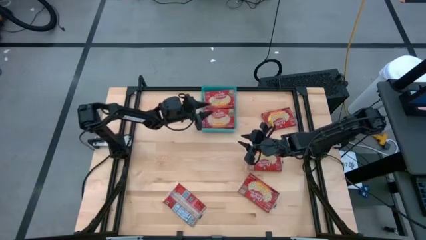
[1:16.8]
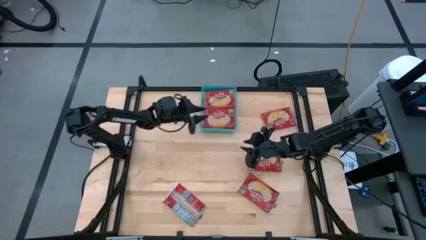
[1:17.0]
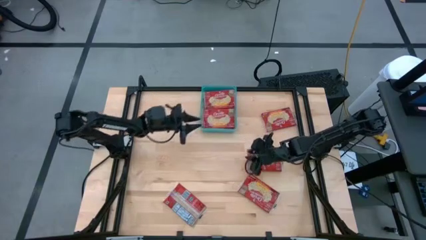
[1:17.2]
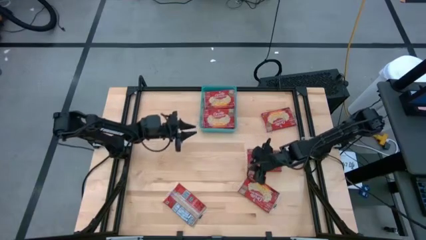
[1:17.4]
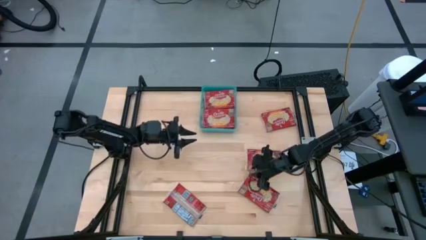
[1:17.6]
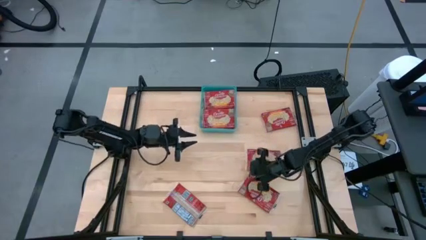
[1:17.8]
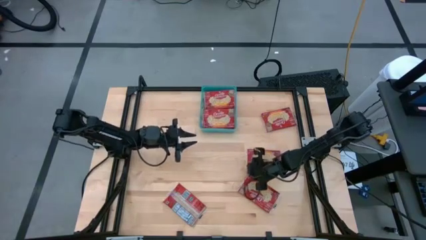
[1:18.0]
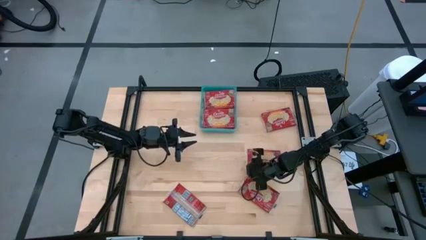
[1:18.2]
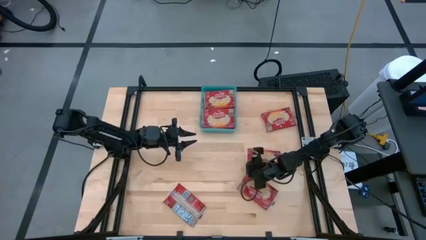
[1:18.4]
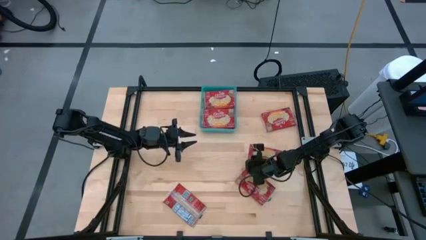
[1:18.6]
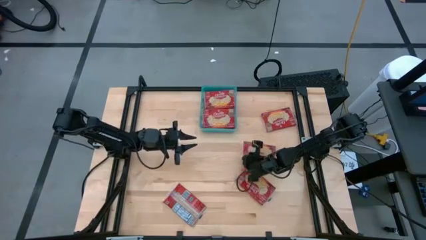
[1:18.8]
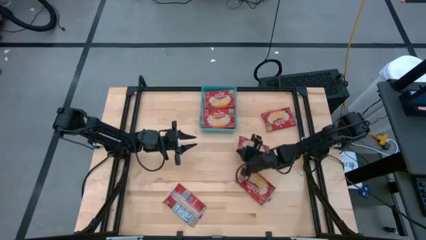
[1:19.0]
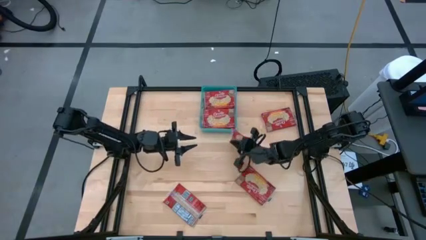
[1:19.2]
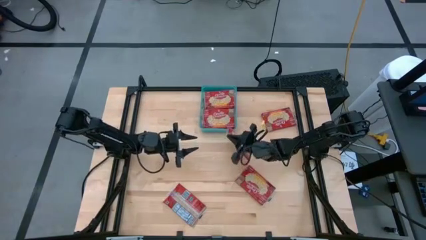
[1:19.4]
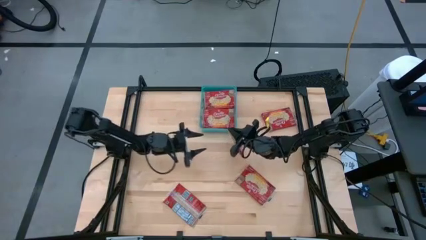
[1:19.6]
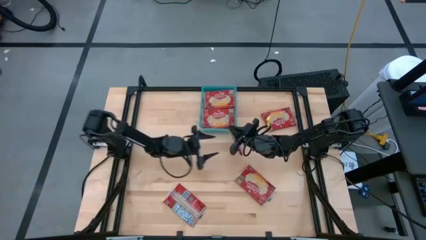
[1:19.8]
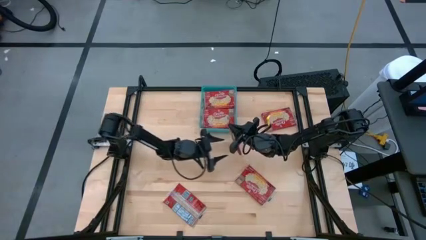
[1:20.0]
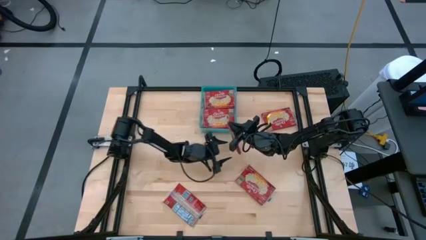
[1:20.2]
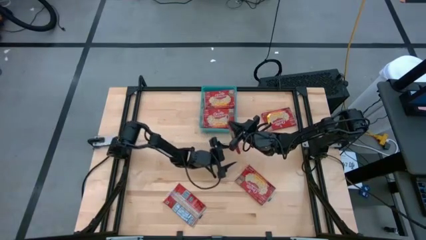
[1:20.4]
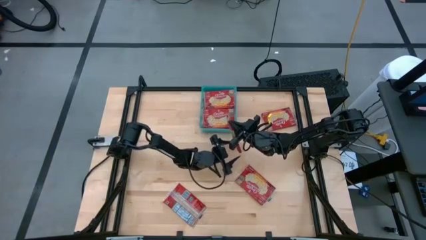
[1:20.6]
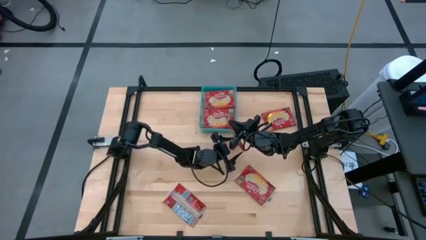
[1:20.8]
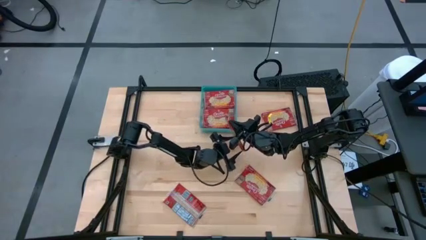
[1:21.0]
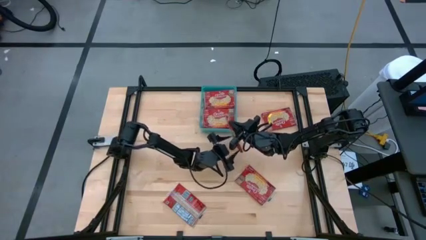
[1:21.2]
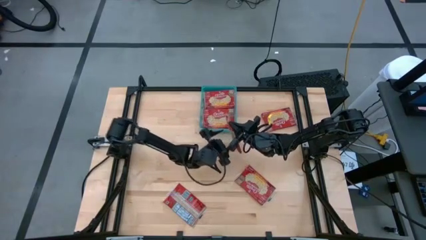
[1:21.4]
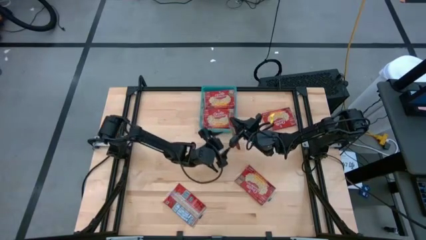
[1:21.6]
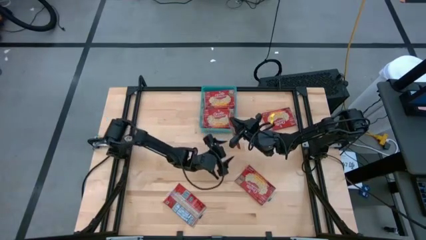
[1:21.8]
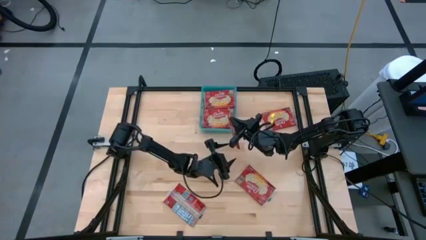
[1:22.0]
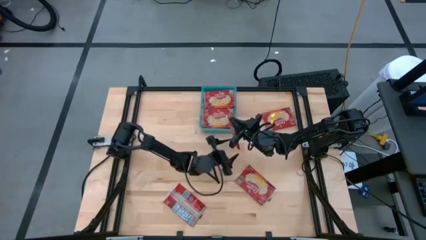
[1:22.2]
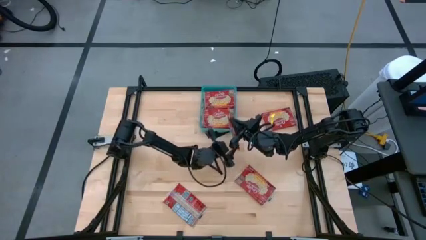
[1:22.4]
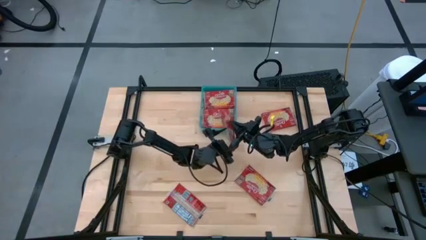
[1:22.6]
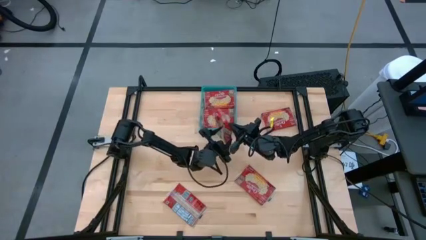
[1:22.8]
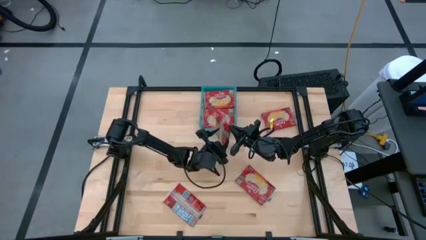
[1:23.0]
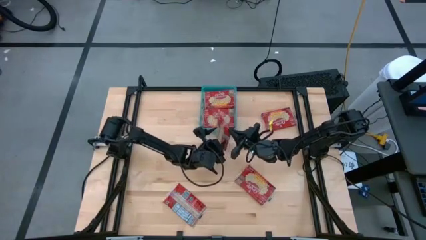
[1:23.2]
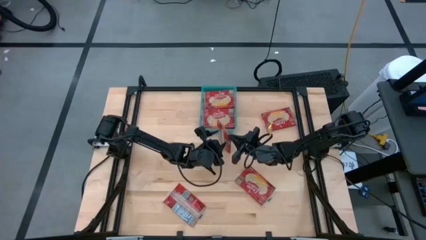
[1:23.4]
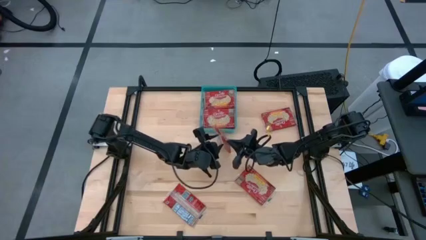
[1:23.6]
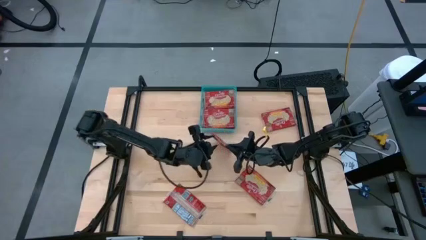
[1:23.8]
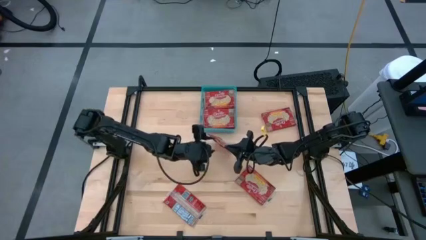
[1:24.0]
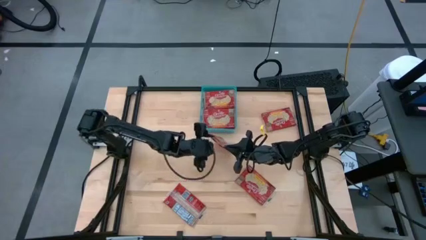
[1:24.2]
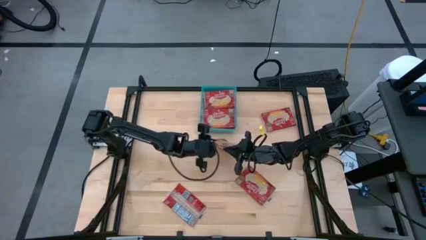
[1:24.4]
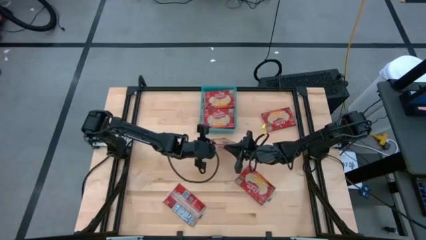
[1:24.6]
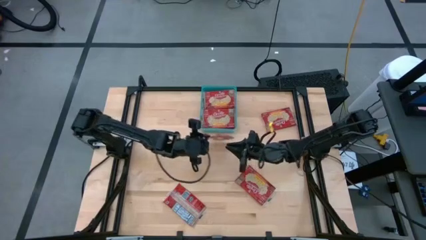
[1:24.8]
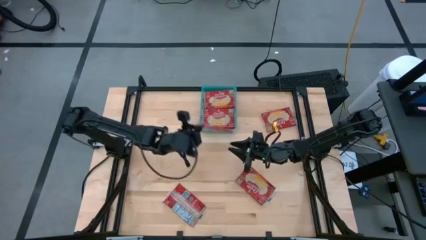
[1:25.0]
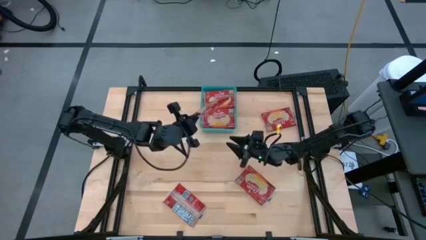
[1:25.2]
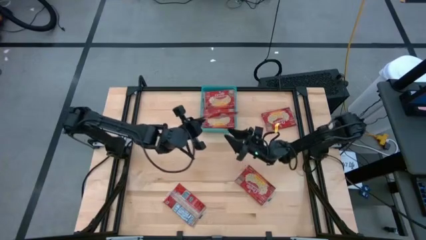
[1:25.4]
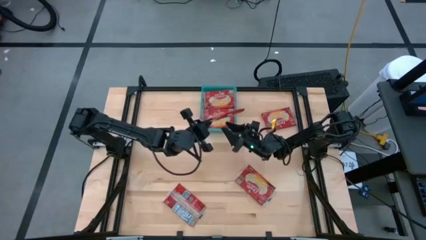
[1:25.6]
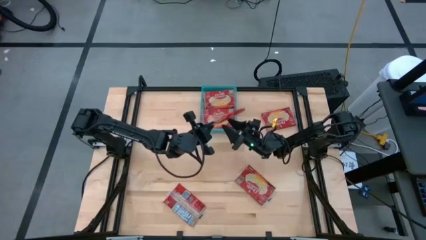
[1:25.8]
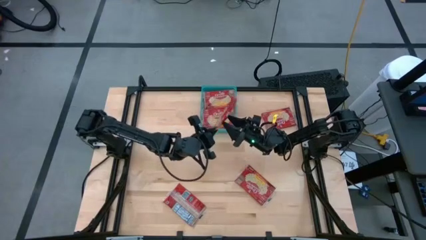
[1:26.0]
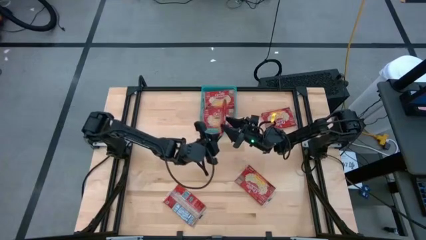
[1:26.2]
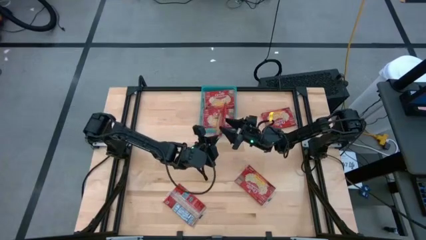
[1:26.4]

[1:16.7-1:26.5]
Task: Sort popcorn bags into baskets
Put the red popcorn bag into the blue bin

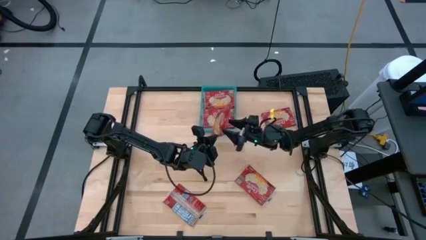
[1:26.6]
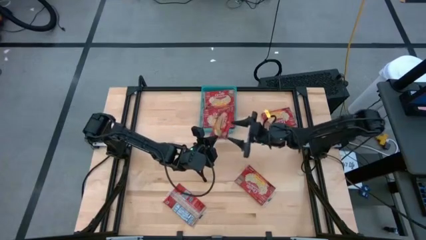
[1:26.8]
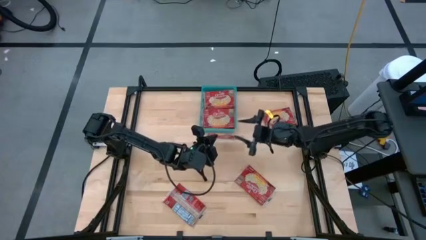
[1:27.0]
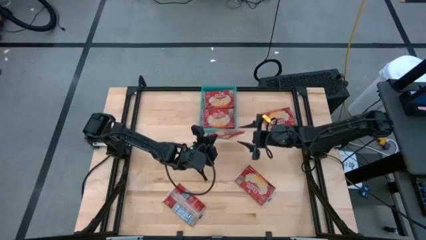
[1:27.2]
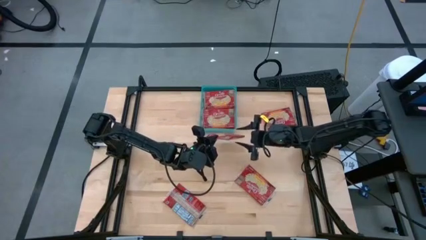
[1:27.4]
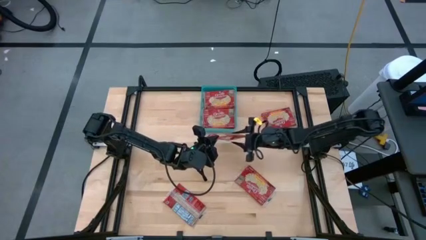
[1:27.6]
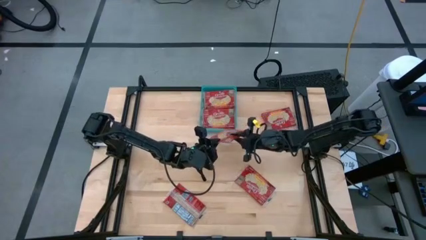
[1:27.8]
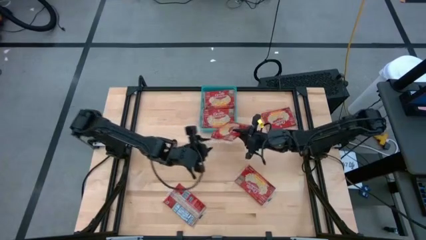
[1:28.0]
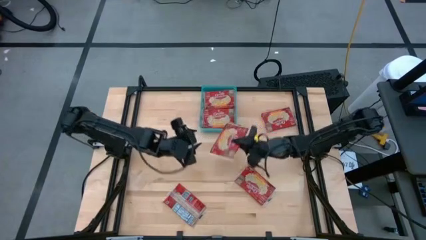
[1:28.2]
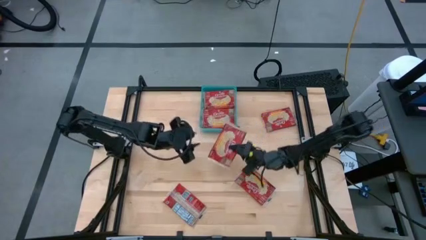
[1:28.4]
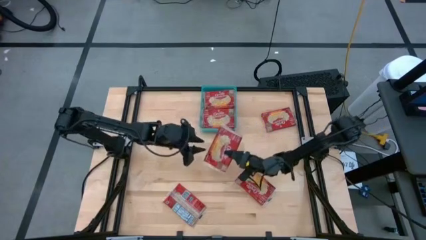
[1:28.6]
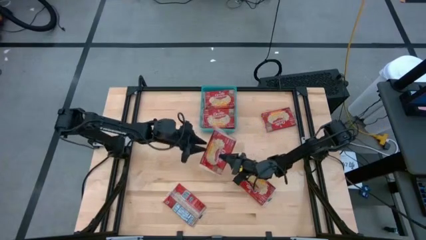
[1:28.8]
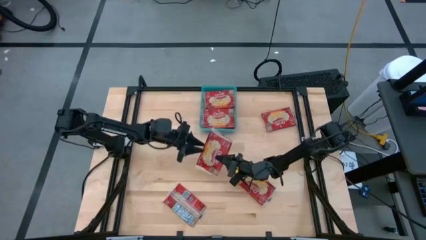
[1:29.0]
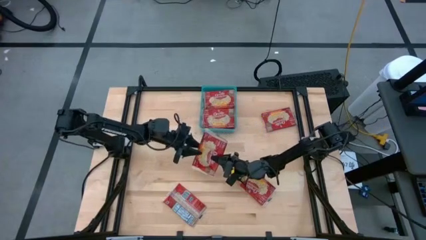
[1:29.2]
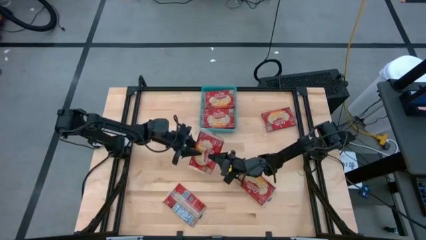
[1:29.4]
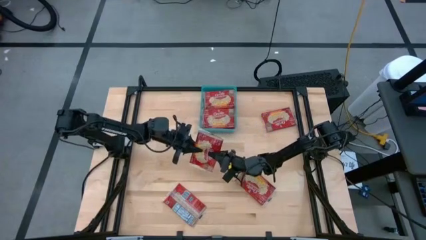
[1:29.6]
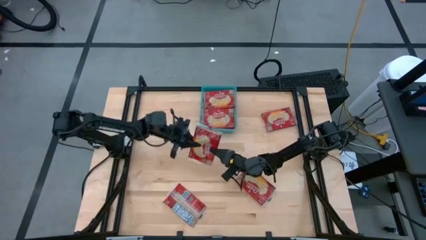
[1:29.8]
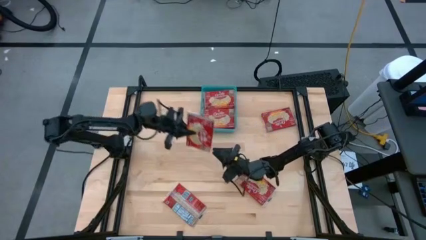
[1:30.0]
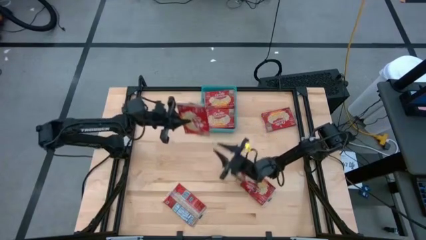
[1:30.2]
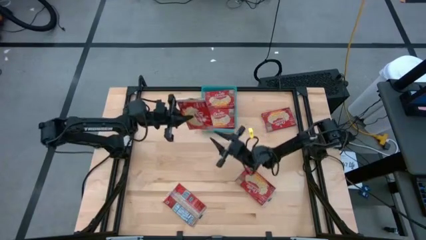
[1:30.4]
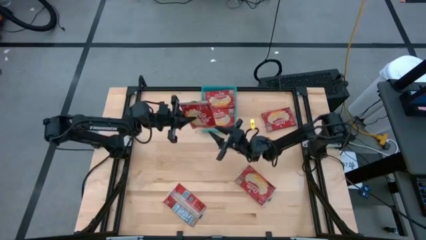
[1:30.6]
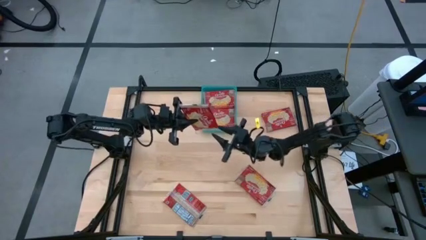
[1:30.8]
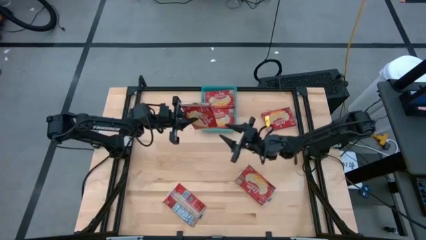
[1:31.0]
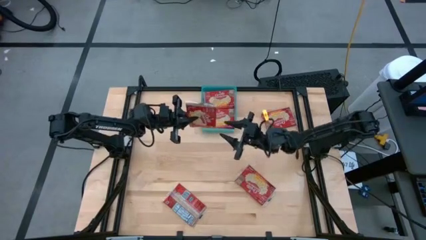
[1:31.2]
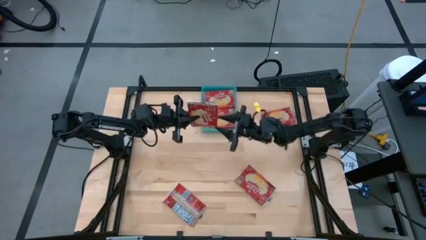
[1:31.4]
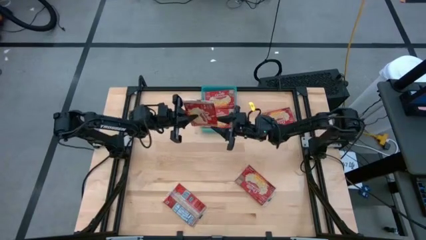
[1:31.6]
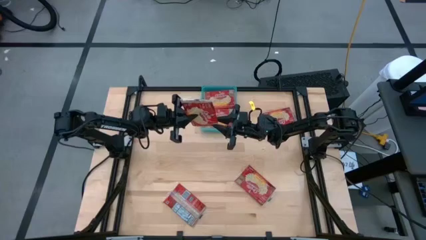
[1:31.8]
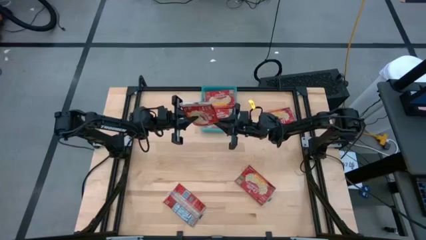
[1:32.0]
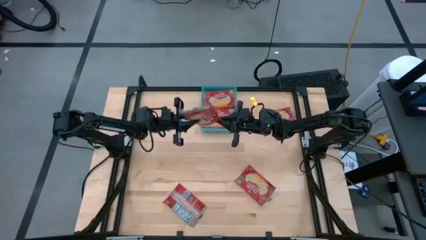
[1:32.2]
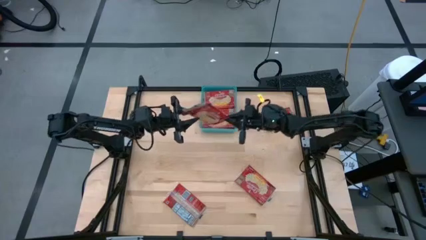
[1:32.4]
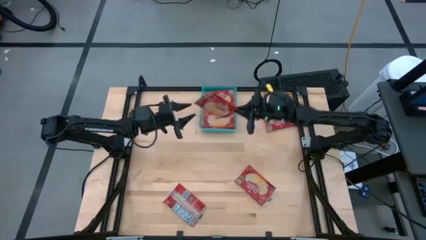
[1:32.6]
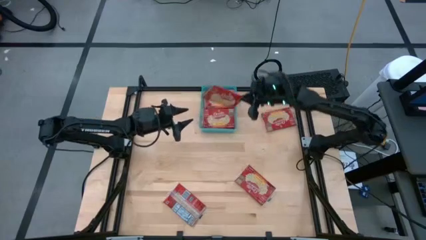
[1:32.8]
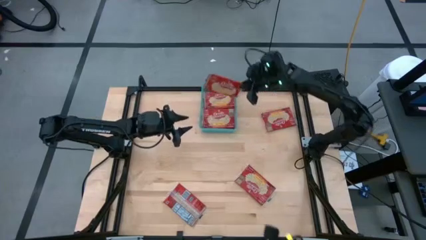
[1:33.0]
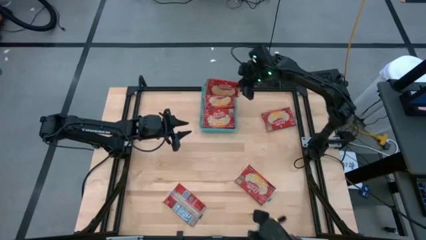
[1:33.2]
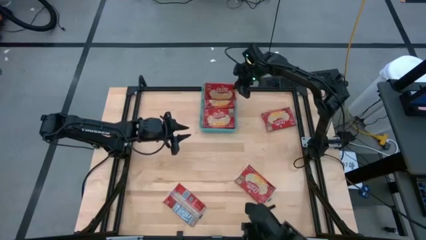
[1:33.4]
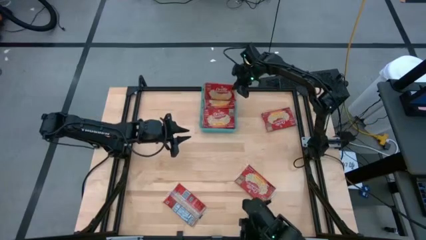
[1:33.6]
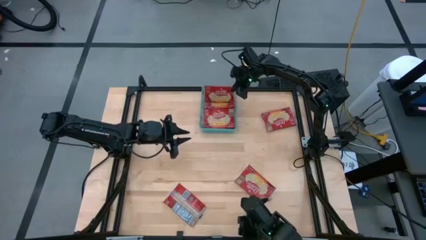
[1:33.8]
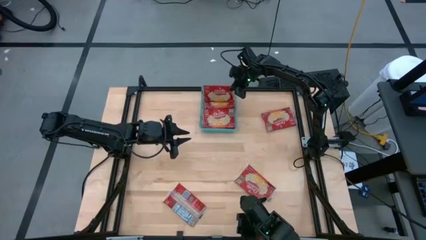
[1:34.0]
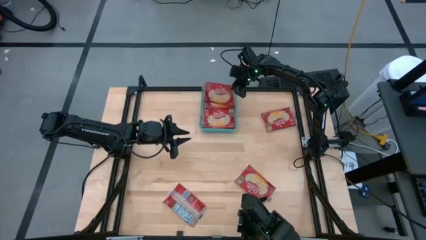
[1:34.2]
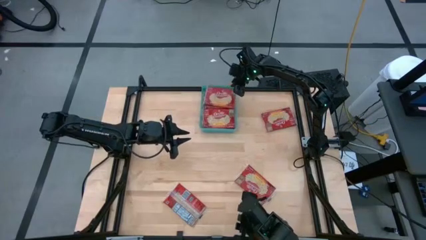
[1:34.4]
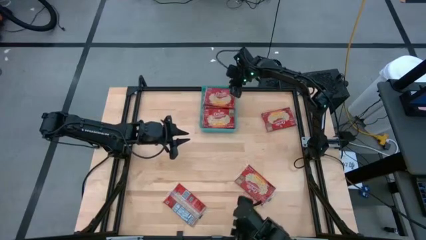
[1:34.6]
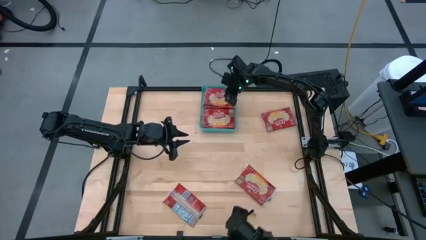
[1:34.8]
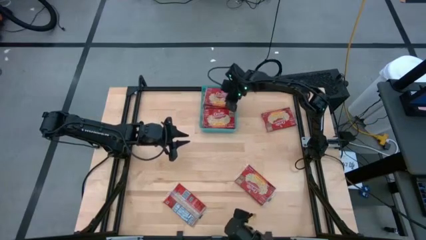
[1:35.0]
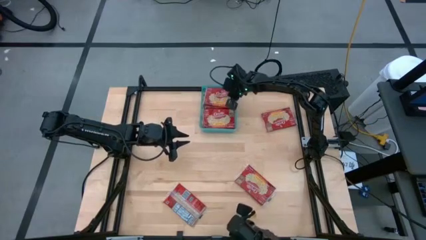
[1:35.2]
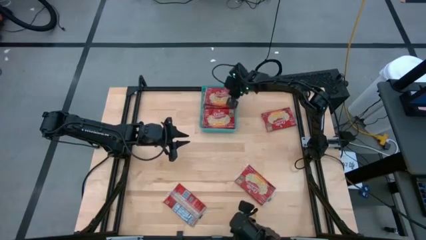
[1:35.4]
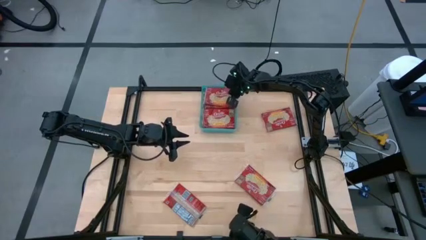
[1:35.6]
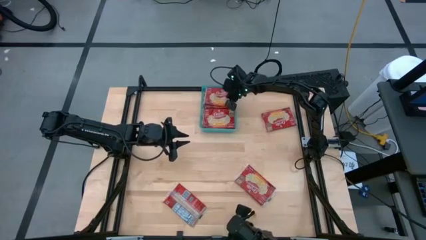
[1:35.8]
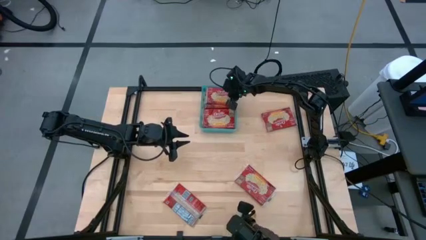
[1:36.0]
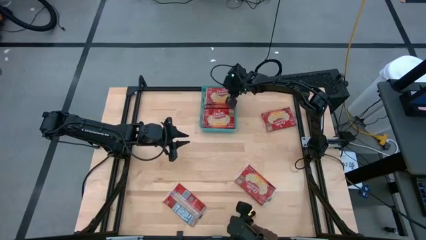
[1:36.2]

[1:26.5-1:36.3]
Put the red popcorn bag into the blue bin
